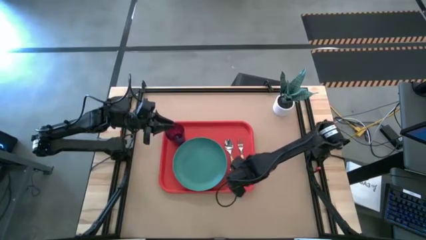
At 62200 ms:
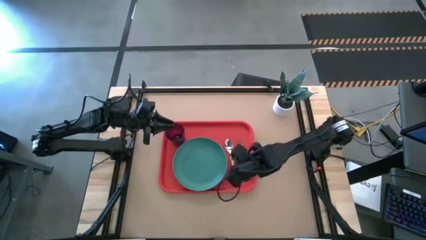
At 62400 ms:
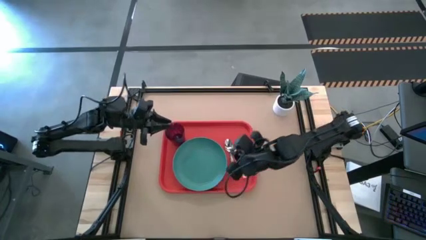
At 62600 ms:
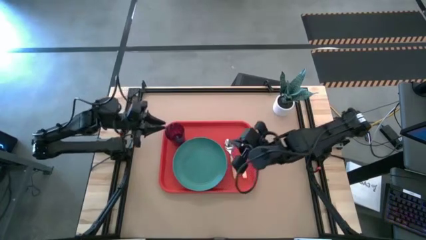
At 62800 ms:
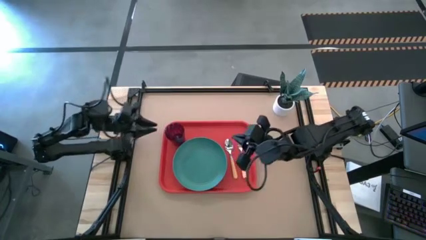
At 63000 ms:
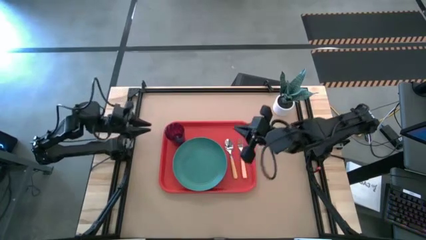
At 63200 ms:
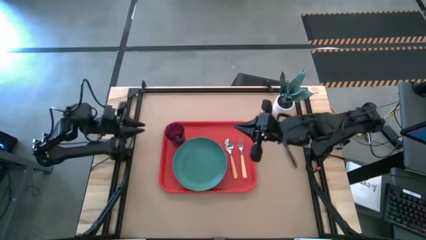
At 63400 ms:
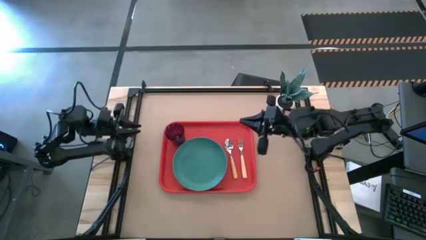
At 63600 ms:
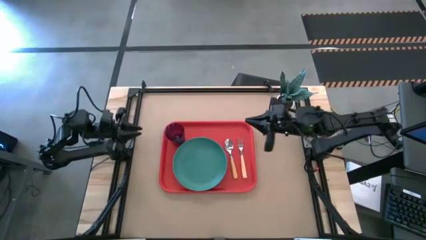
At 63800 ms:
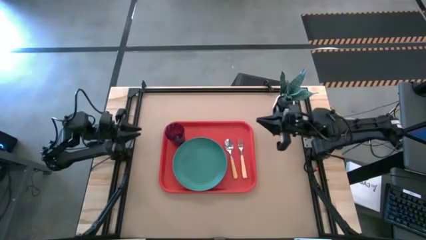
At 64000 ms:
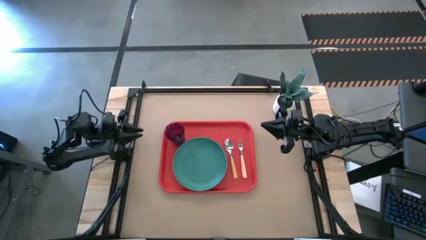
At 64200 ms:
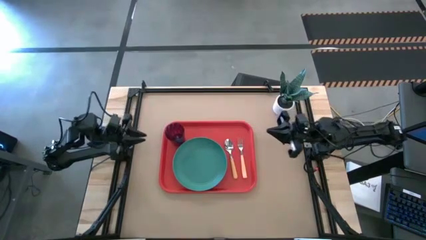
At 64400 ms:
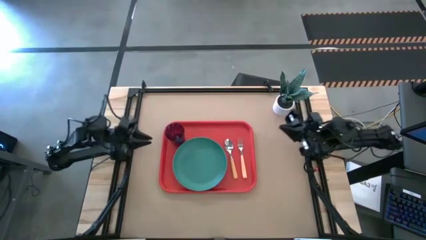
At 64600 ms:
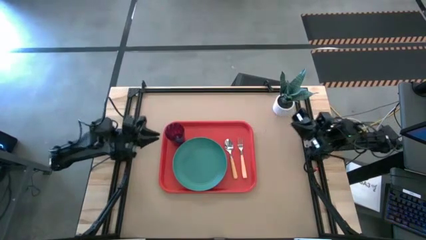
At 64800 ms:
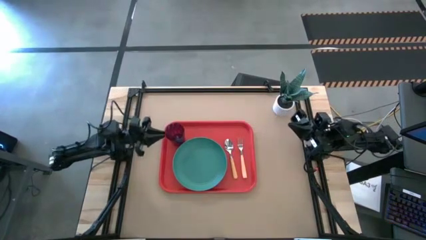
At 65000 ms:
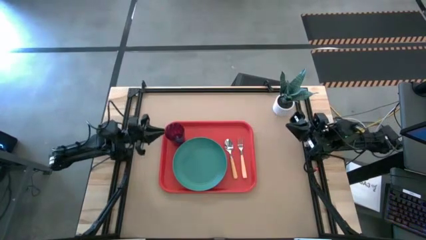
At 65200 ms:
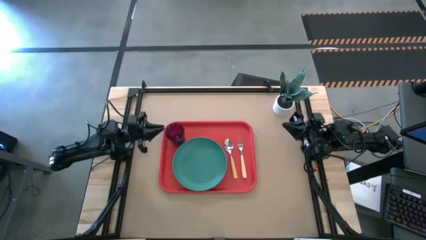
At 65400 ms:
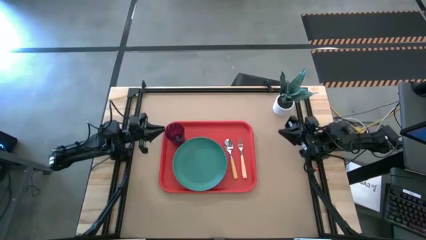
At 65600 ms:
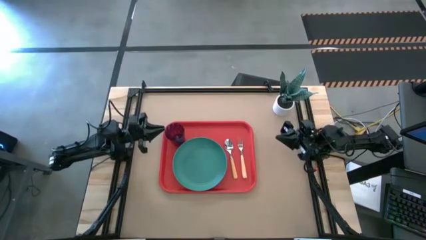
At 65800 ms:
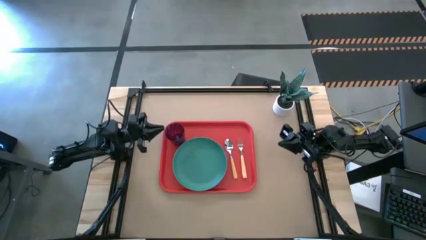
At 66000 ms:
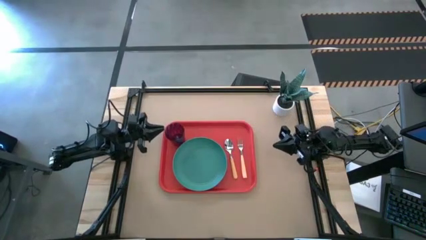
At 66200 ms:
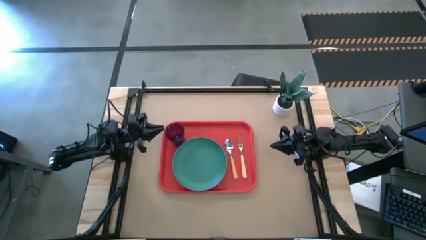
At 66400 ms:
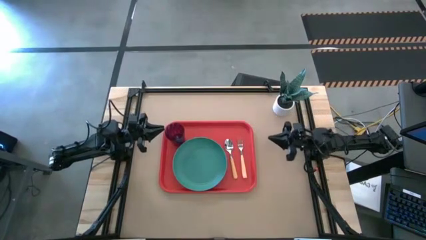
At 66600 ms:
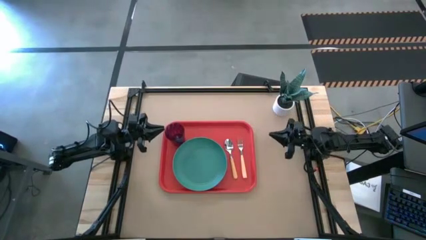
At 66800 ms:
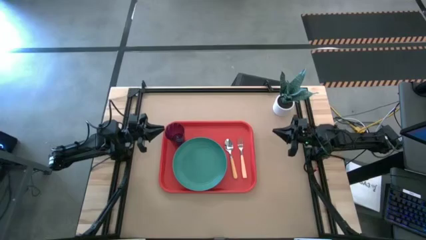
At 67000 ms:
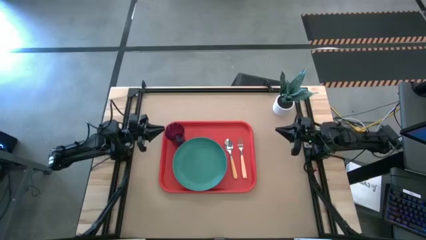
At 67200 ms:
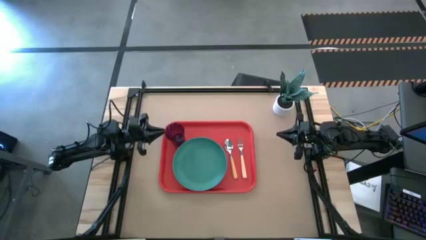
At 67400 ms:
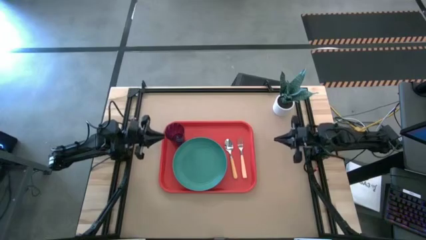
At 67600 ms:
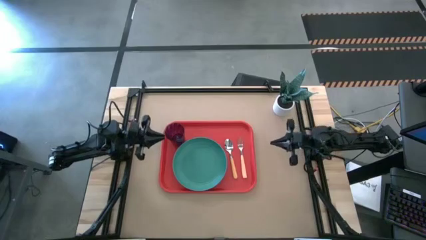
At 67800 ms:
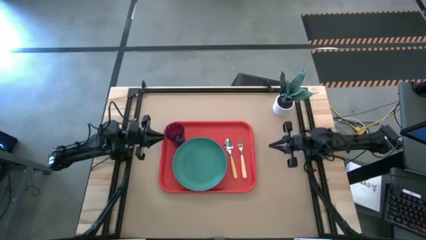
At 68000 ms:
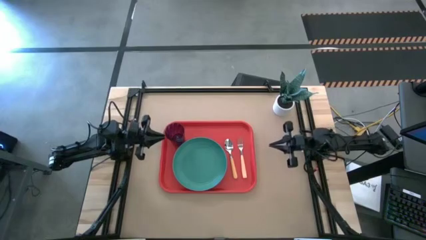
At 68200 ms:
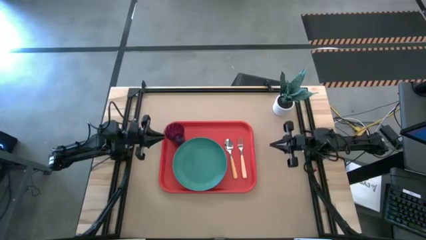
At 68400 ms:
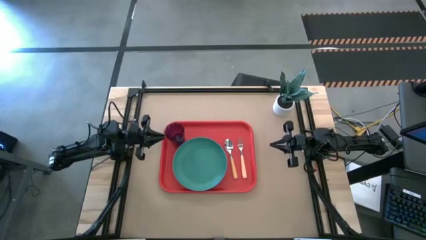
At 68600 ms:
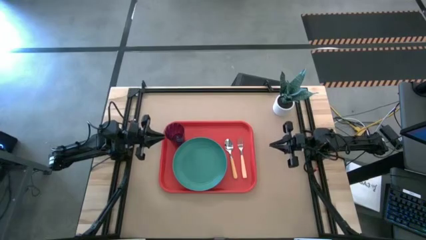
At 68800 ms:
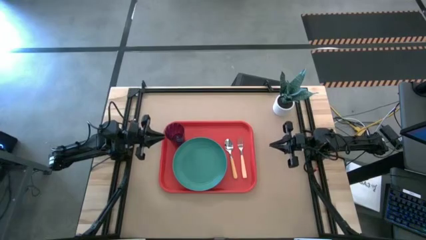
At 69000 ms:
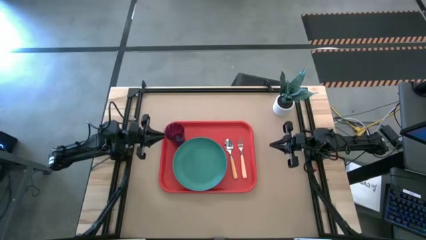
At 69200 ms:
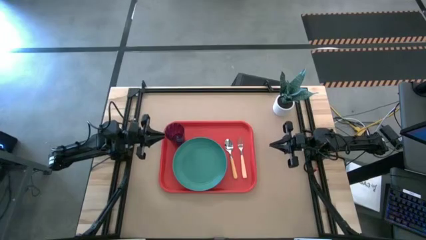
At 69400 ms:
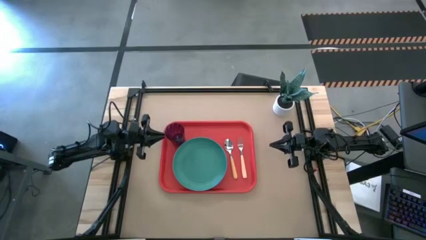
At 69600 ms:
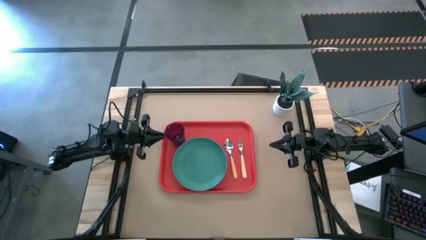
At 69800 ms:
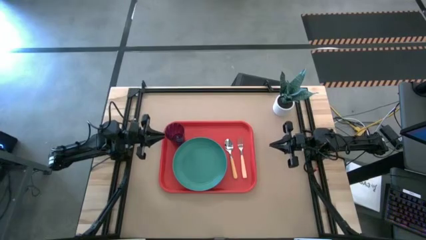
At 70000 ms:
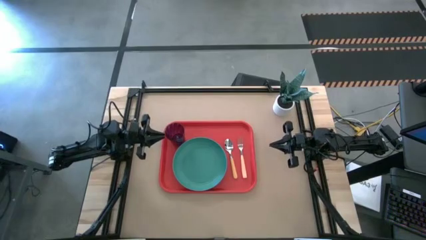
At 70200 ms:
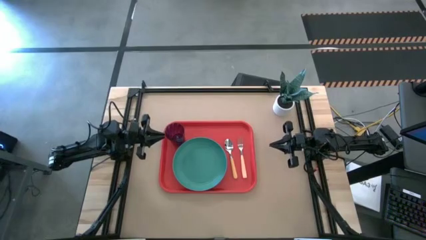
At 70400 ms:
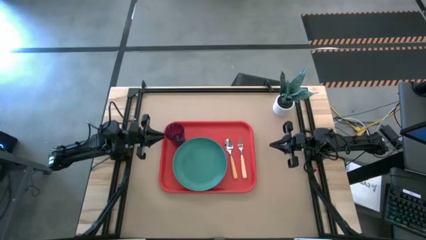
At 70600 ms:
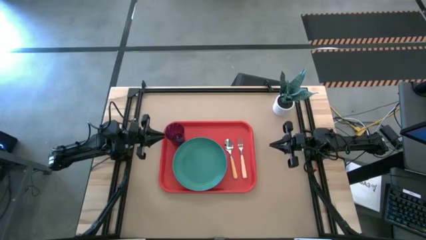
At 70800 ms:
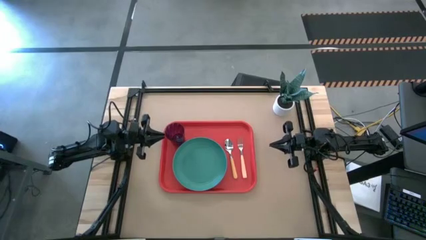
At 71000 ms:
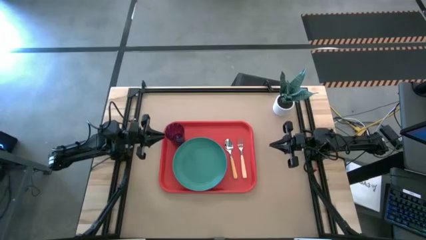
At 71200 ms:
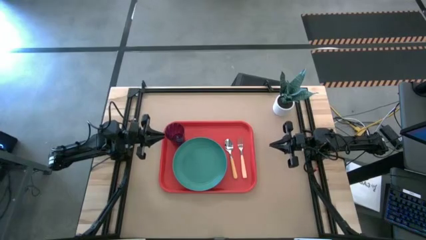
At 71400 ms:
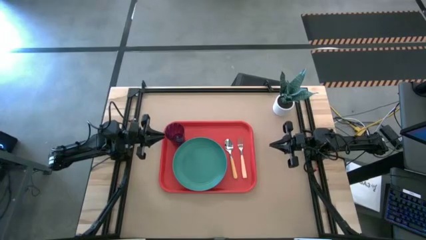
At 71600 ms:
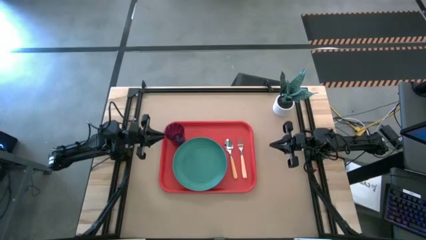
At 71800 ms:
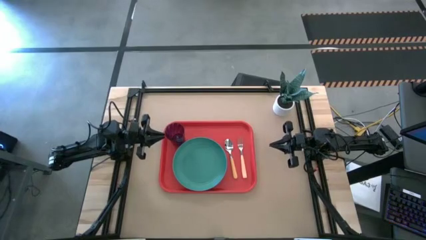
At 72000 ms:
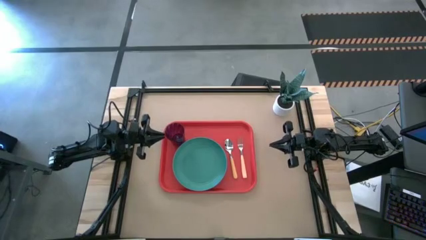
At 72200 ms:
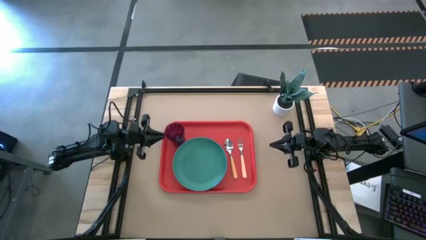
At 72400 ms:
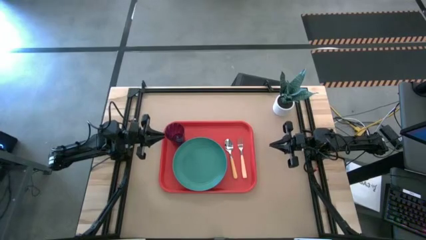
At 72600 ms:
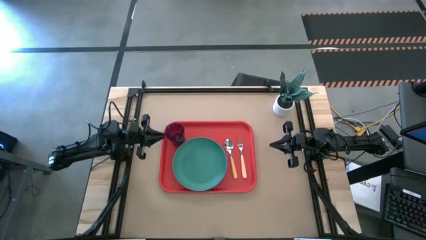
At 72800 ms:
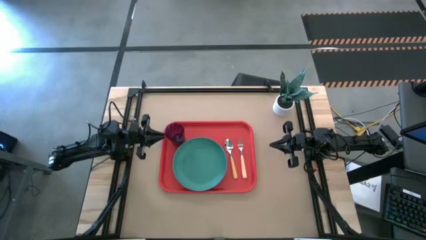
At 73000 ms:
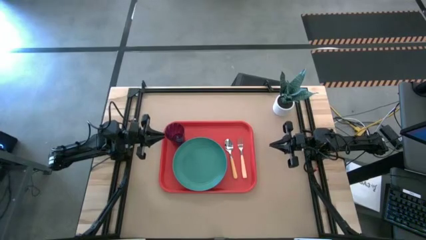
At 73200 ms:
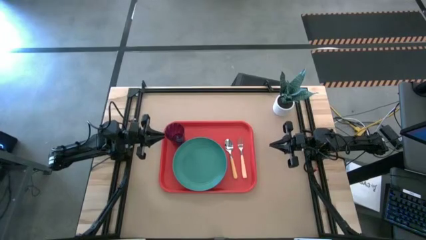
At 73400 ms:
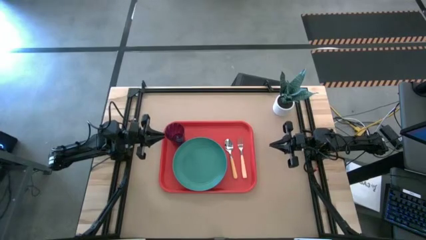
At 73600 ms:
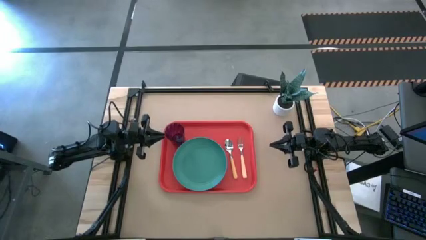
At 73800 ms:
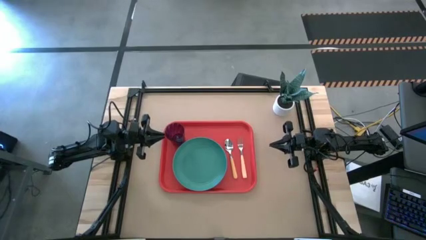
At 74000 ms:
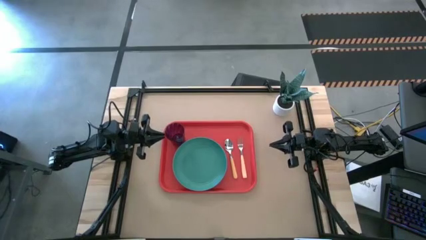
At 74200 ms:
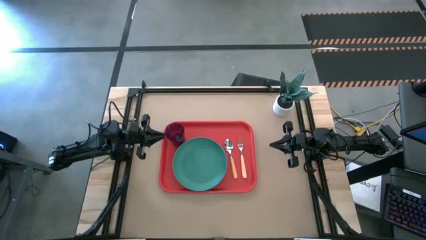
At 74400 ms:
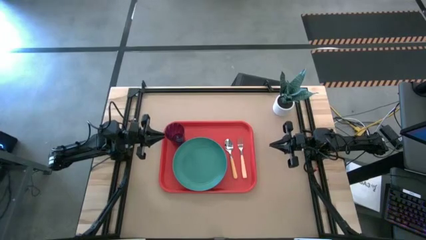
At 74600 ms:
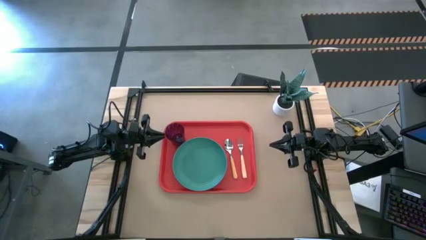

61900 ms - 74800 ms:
Task: Pick and place plate/cup/fork/spoon on tray
Return to Home Position

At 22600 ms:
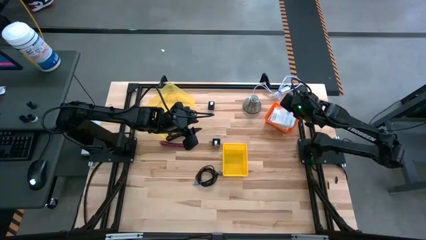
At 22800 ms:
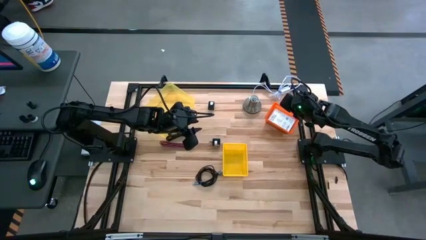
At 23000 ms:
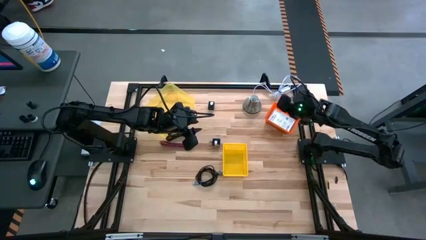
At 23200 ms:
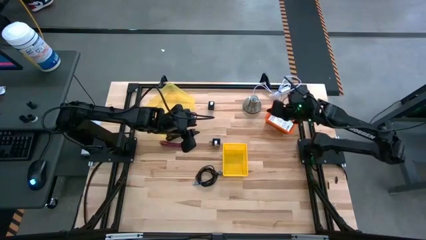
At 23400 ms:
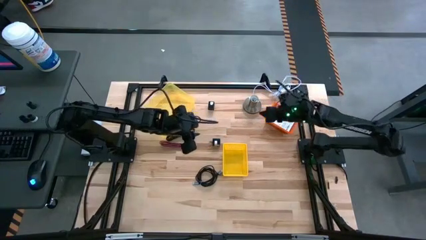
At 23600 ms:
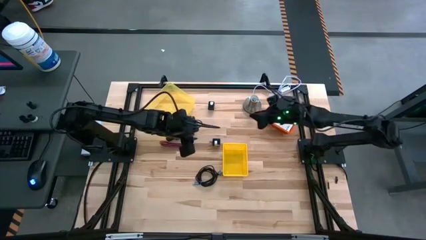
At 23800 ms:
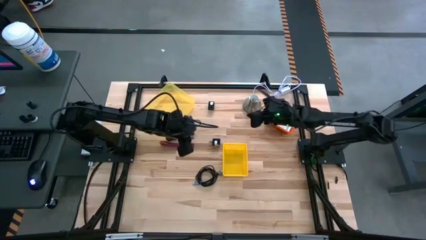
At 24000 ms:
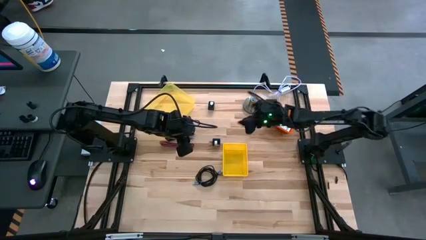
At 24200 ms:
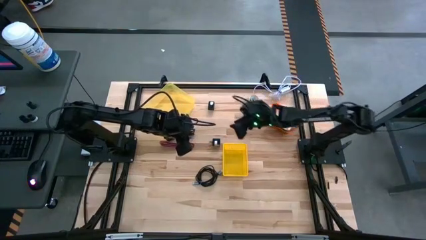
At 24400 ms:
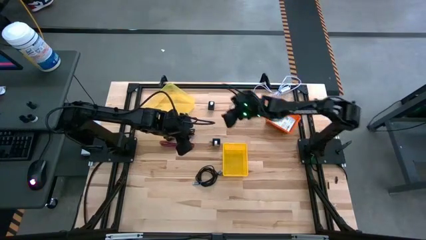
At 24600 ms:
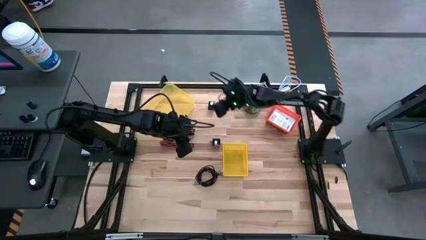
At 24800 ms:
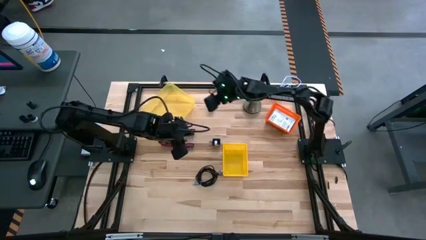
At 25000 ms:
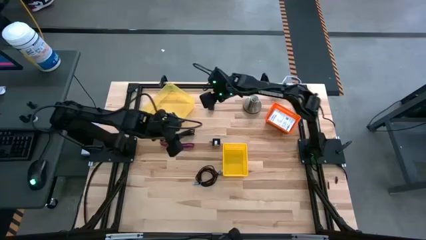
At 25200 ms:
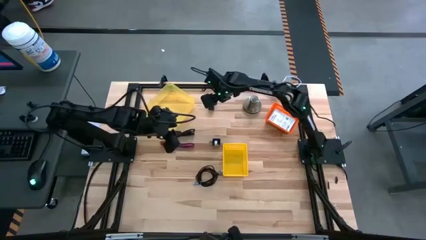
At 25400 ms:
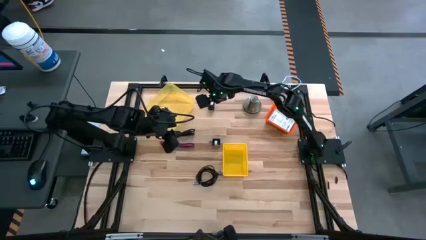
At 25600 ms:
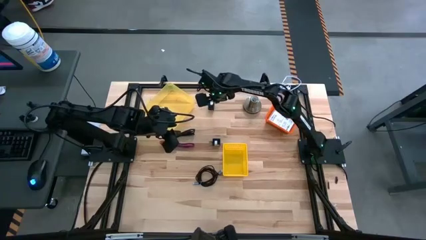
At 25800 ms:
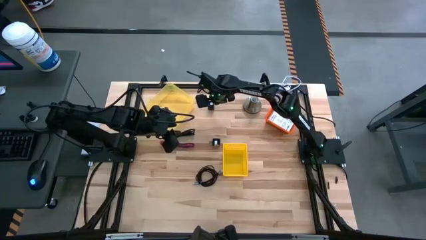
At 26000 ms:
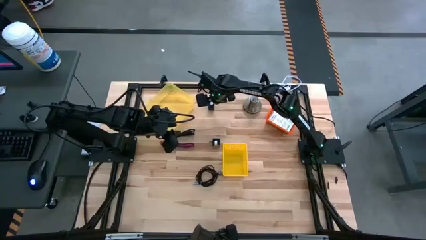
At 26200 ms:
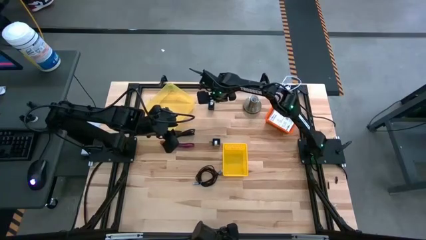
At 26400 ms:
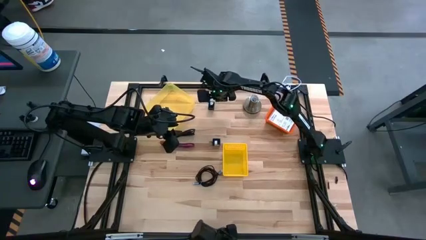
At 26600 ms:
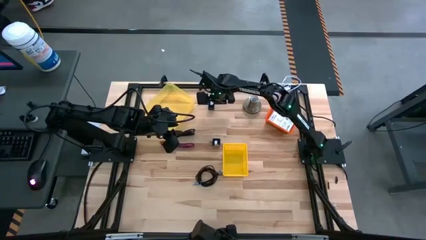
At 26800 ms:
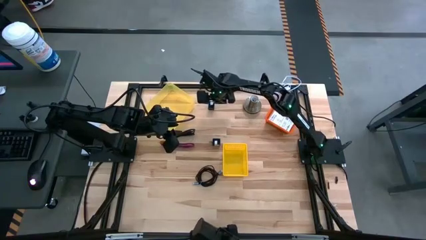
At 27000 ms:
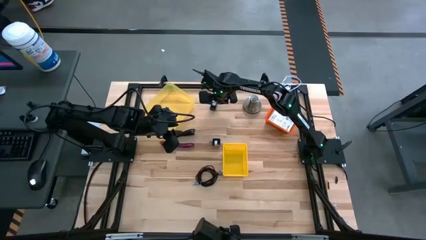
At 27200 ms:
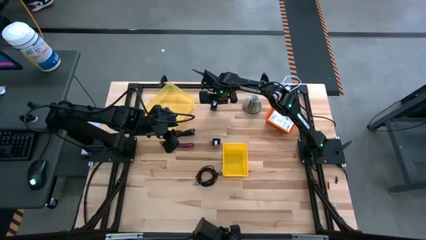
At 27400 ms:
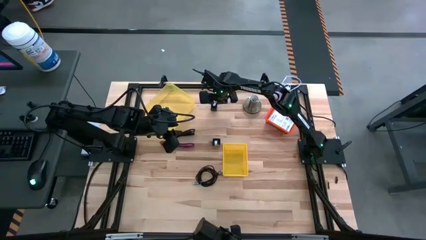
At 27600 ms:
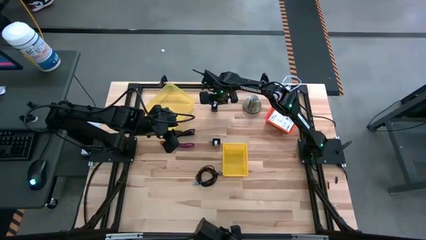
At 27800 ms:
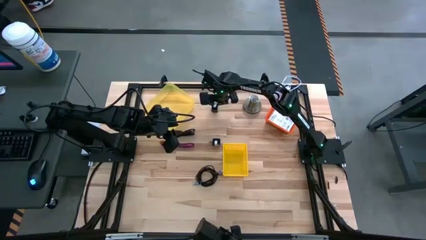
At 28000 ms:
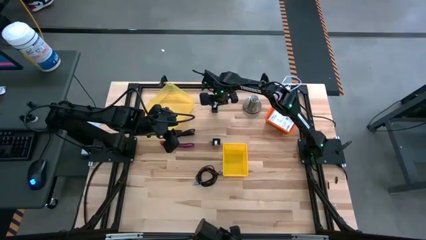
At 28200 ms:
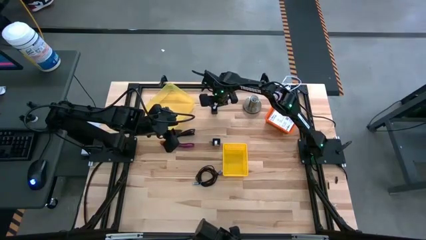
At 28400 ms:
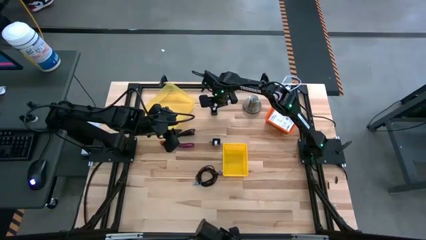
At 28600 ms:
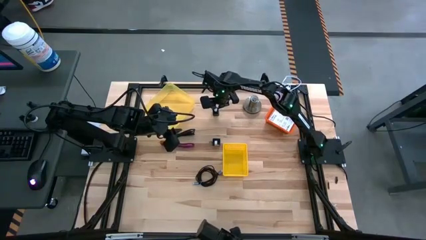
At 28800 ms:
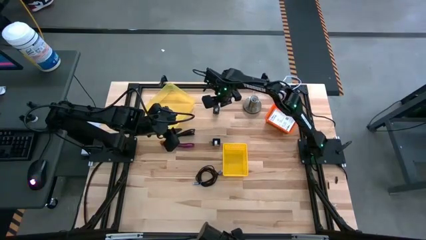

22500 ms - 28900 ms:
Task: Pick and place items into bin
Put the top black charger adapter into the yellow bin
